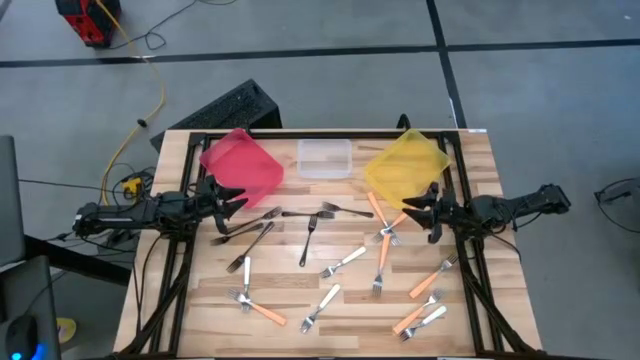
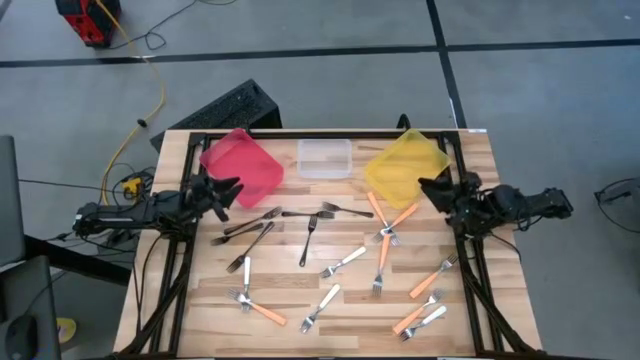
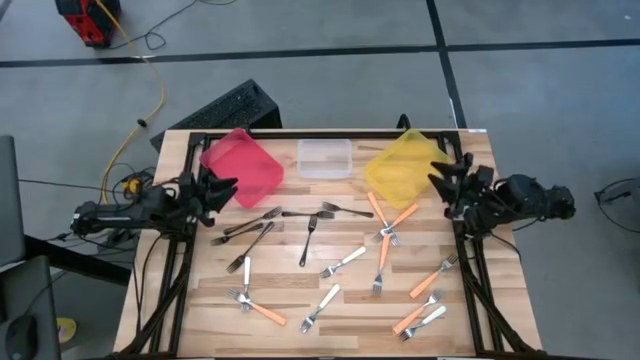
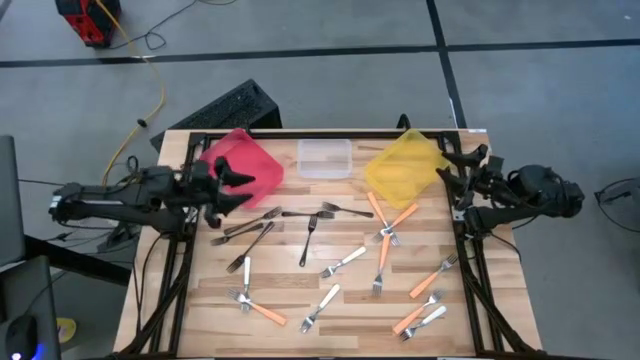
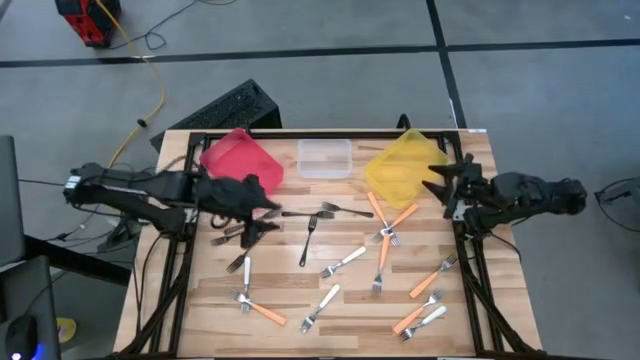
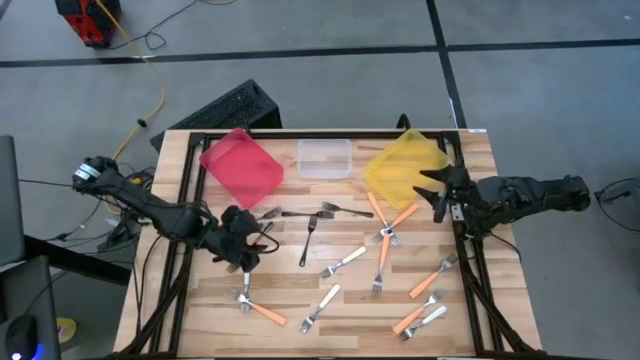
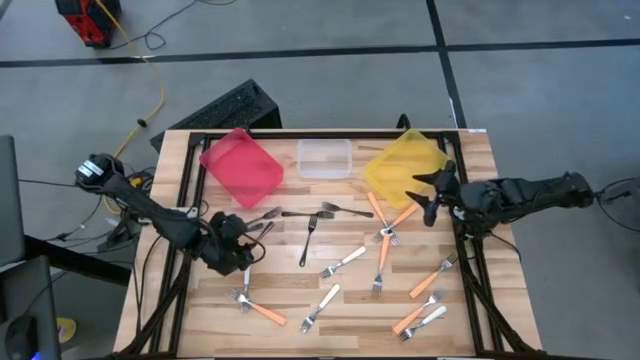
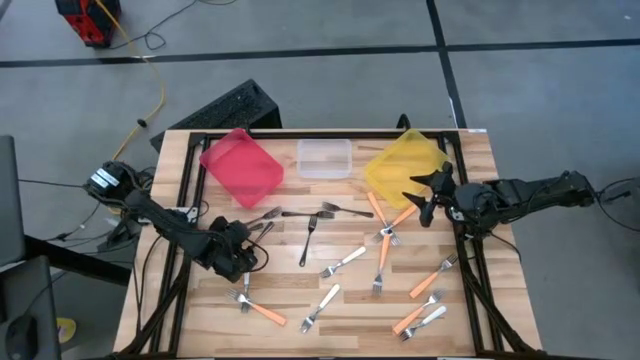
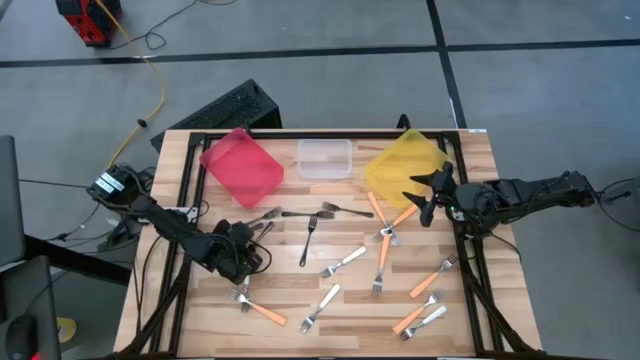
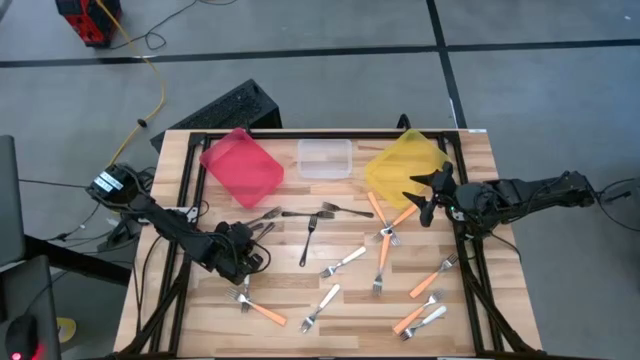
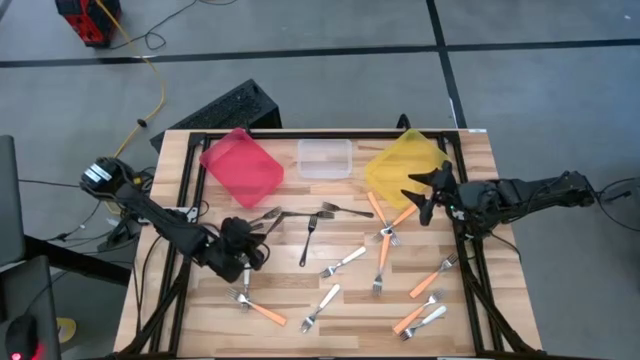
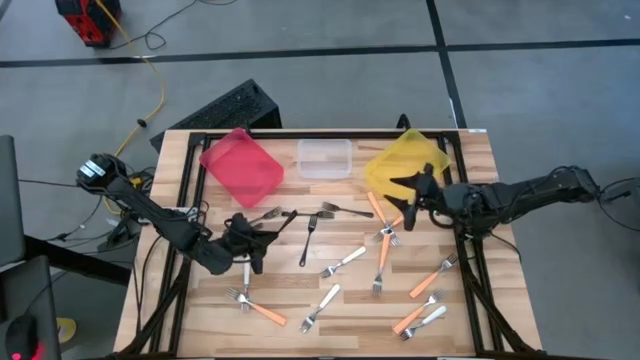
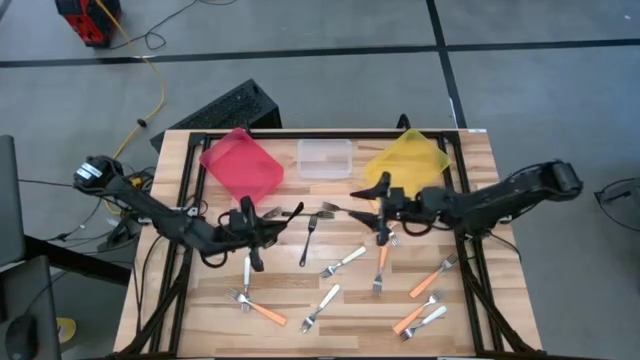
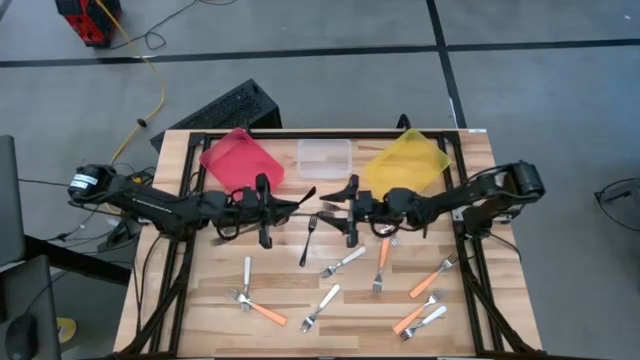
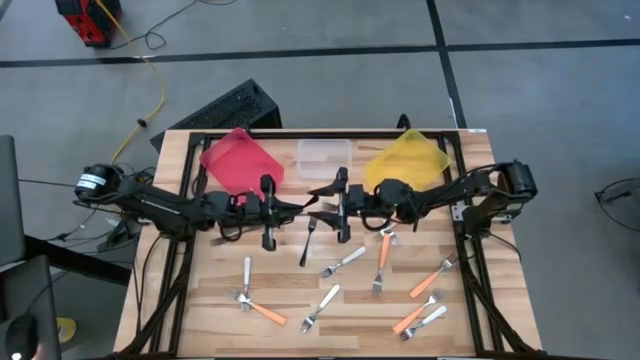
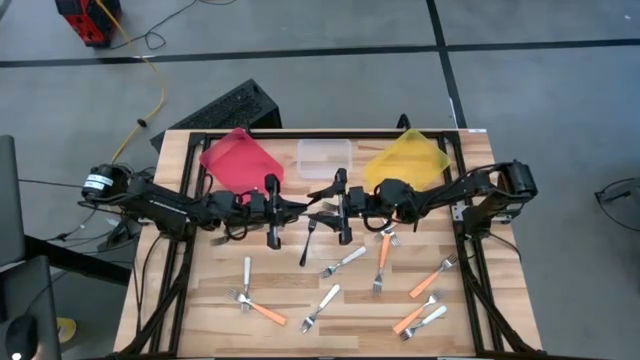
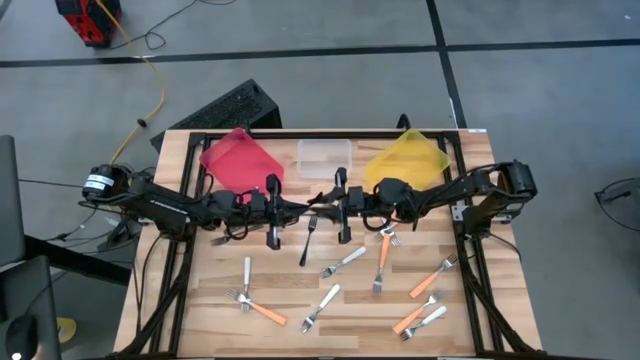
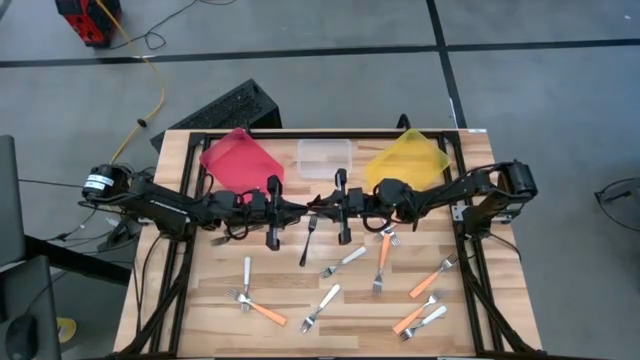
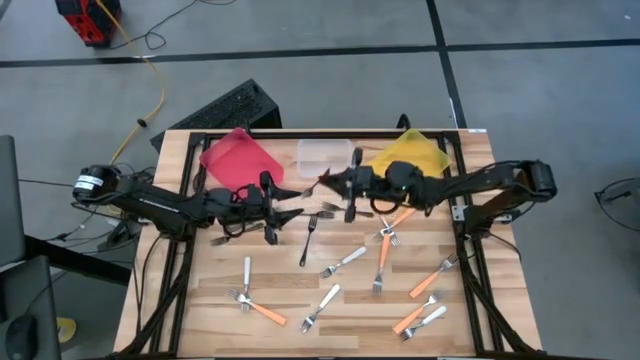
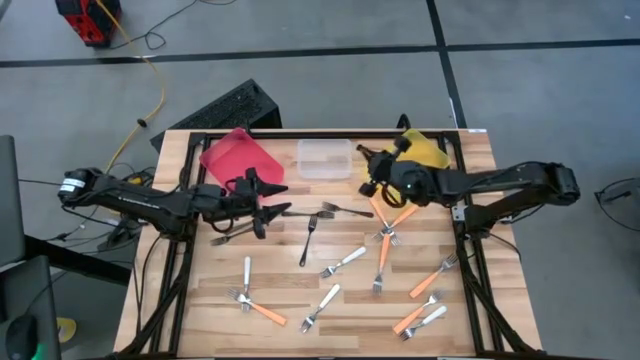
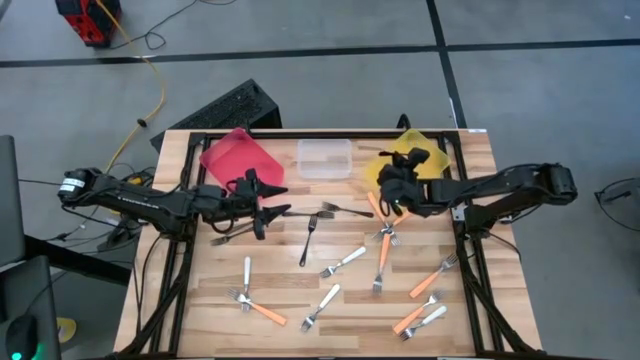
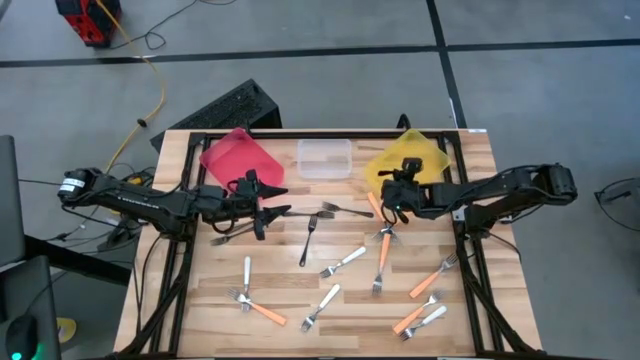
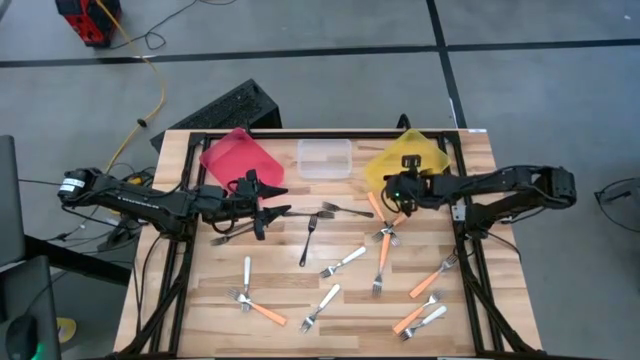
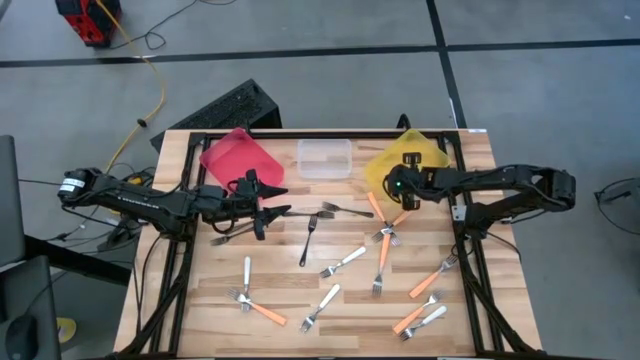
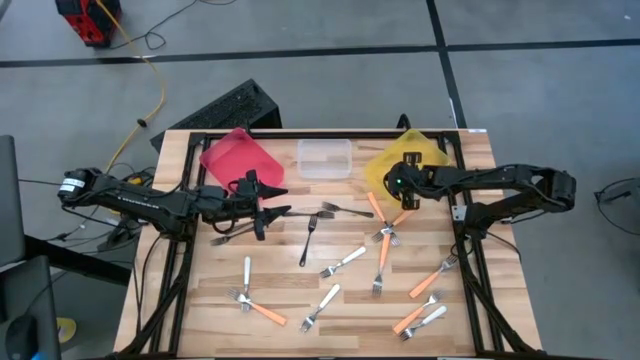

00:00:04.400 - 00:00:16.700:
Task: Sort silverware by color (type)
Put the black fork into the yellow bin

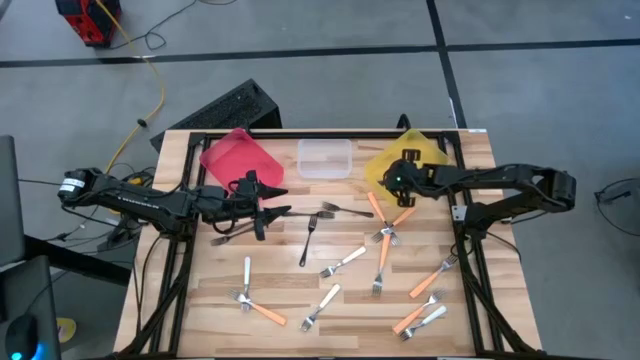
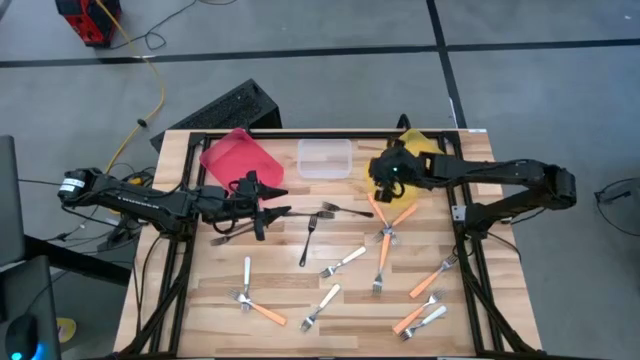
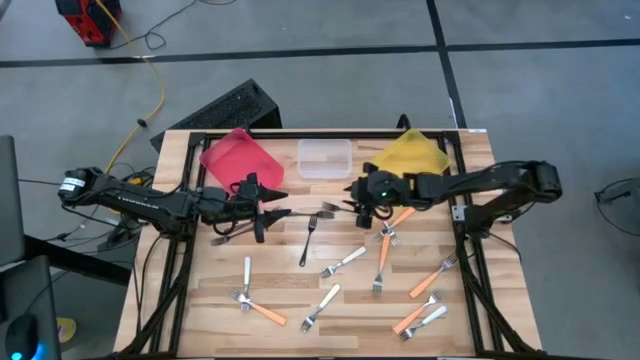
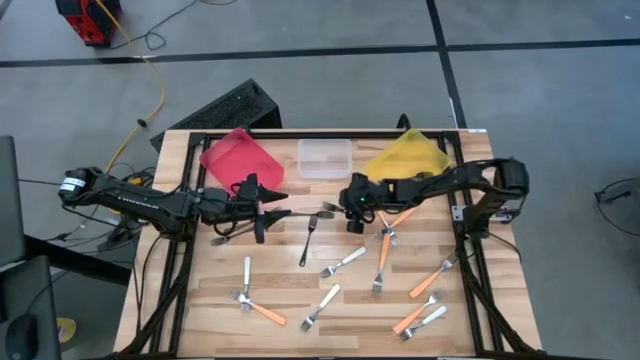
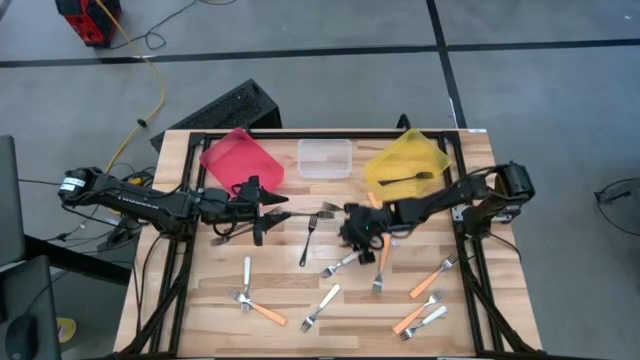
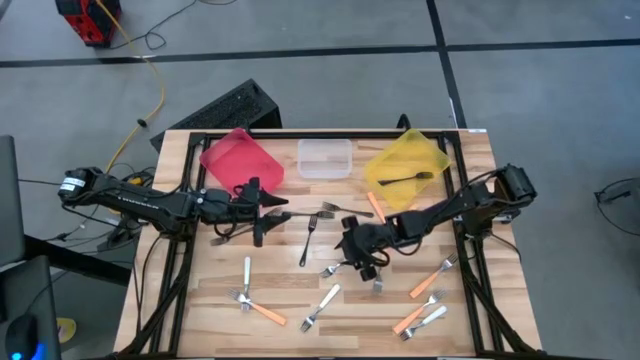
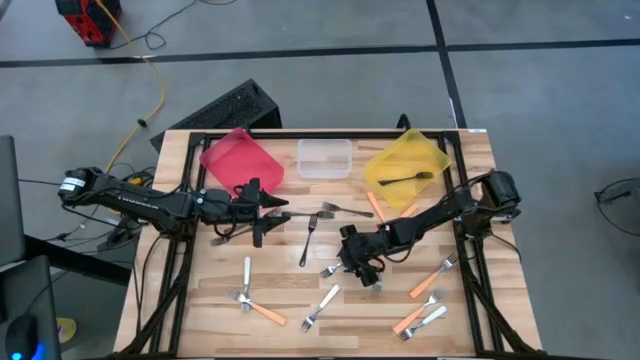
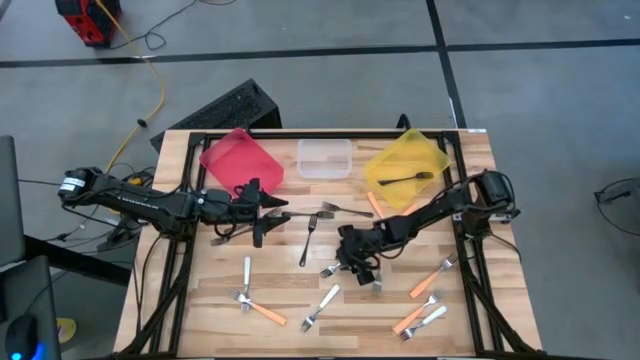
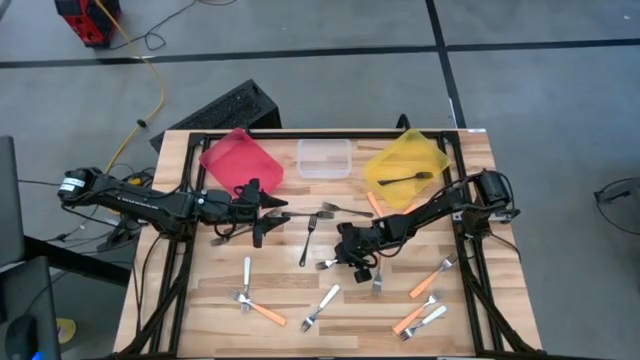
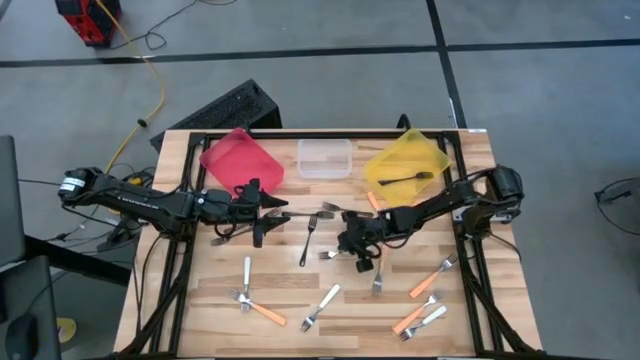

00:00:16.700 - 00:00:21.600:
Put the white fork into the transparent bin

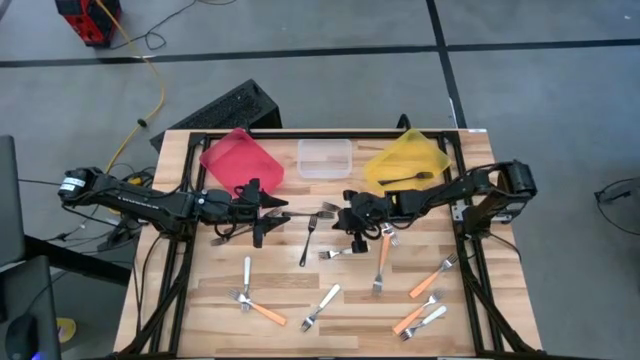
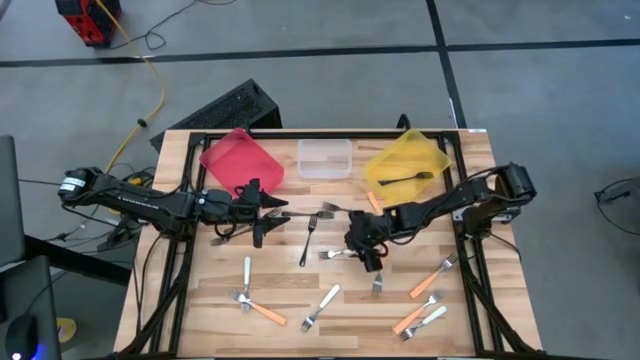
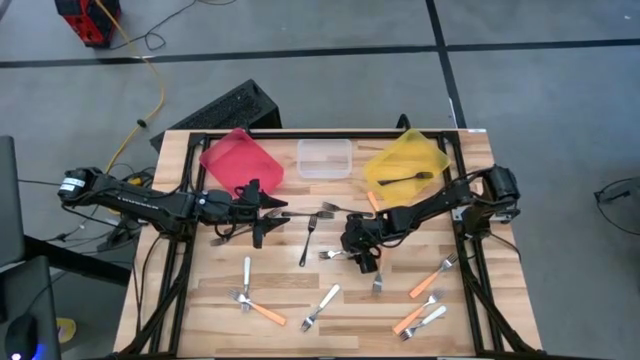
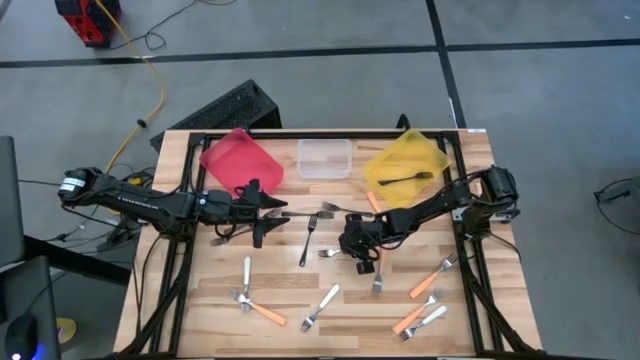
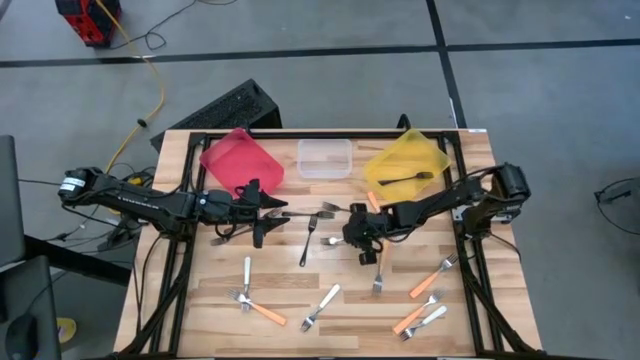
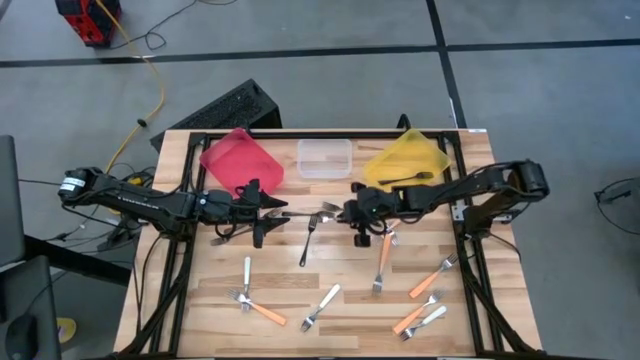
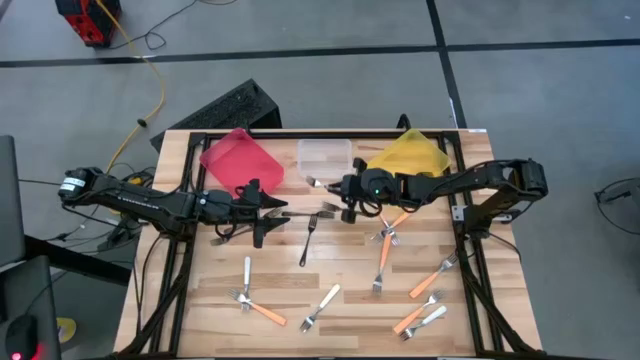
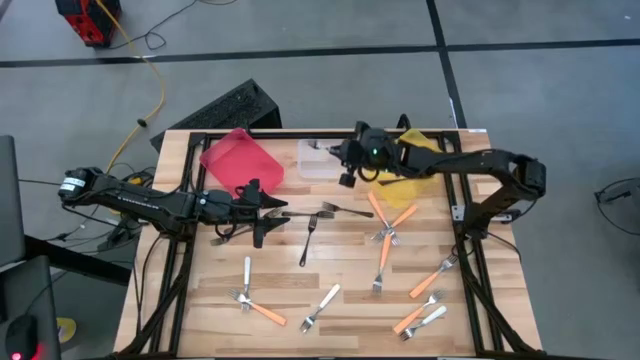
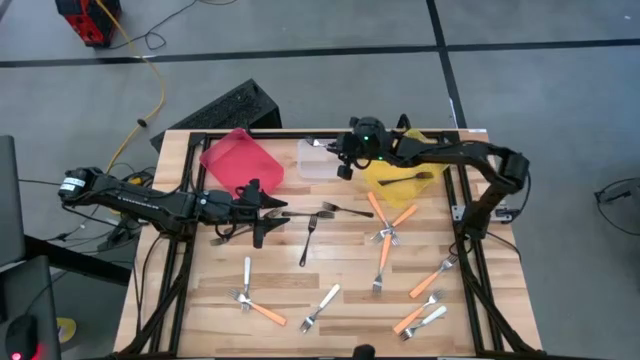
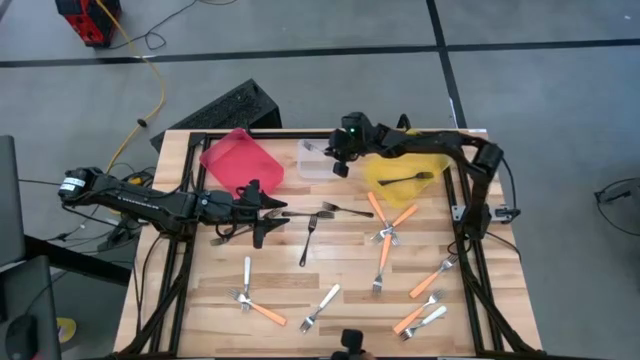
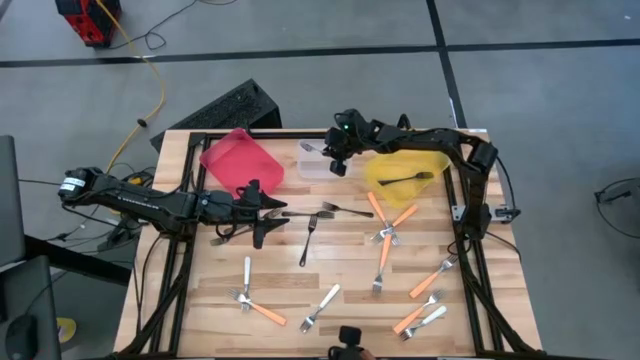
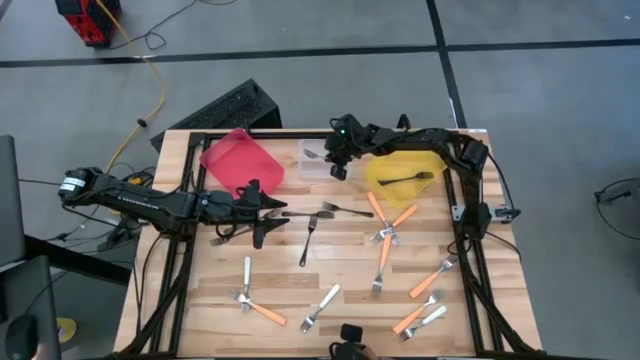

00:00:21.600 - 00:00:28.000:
Put the white fork into the transparent bin
